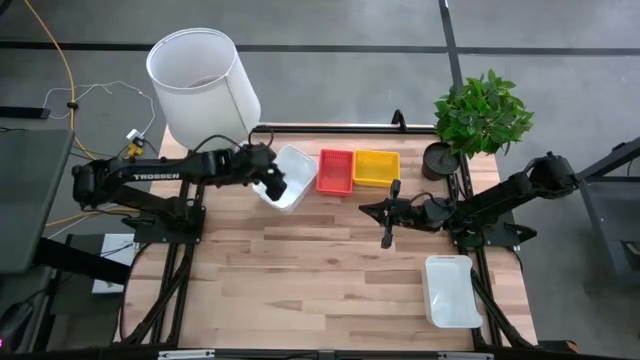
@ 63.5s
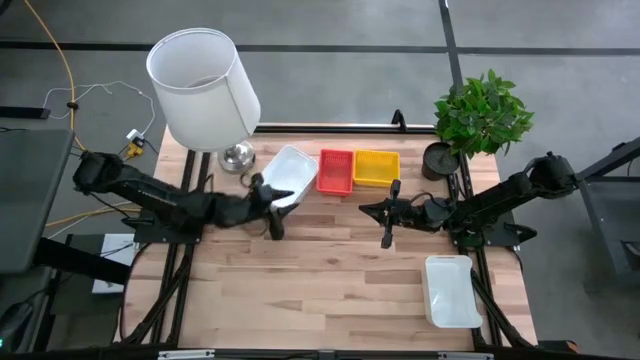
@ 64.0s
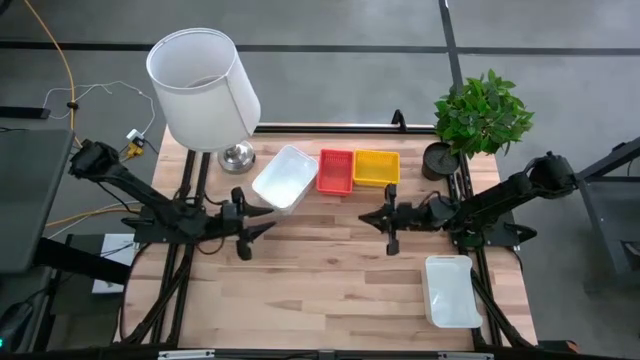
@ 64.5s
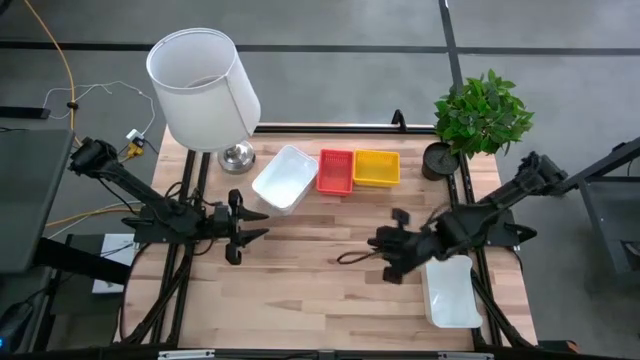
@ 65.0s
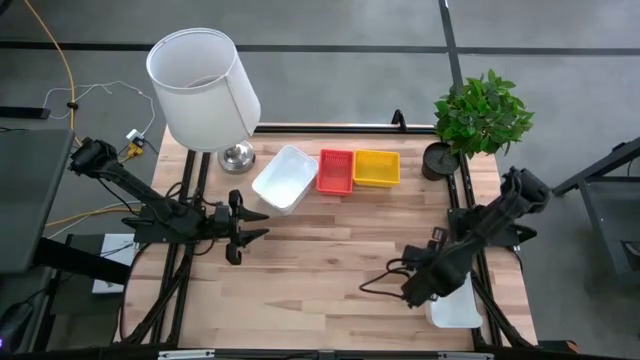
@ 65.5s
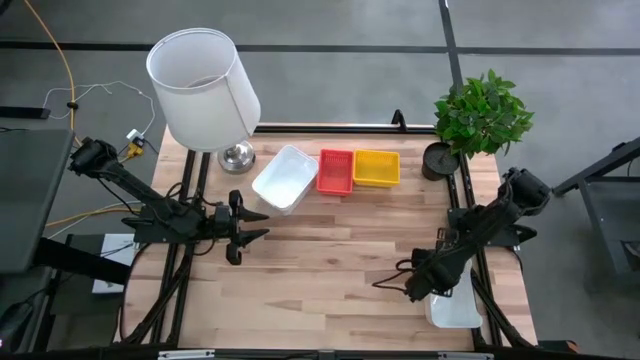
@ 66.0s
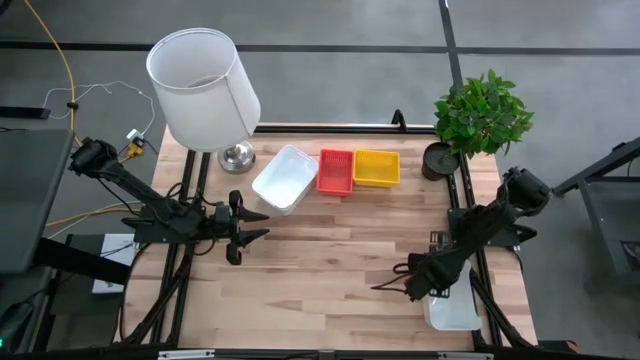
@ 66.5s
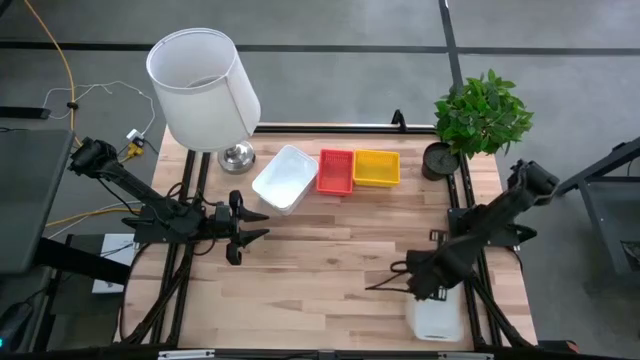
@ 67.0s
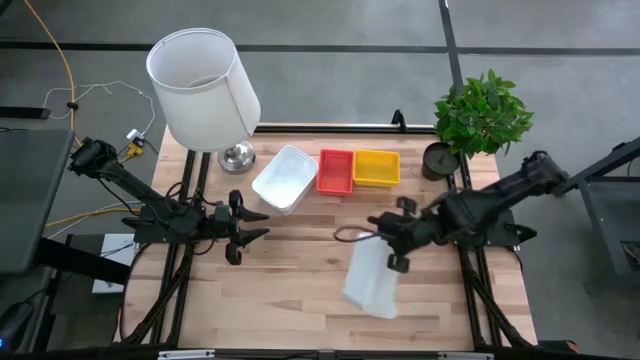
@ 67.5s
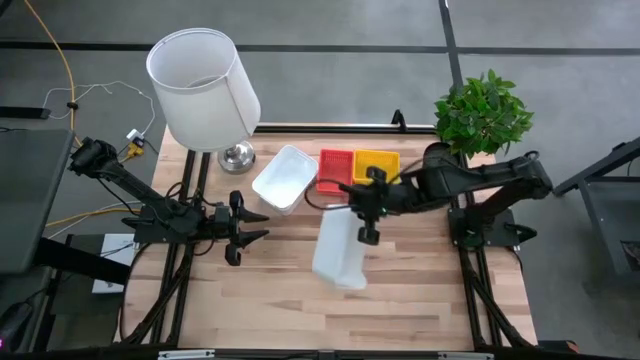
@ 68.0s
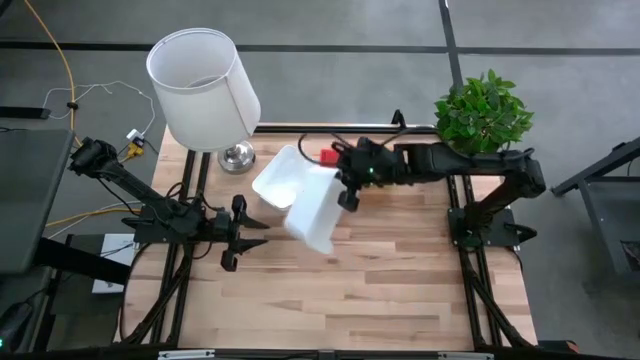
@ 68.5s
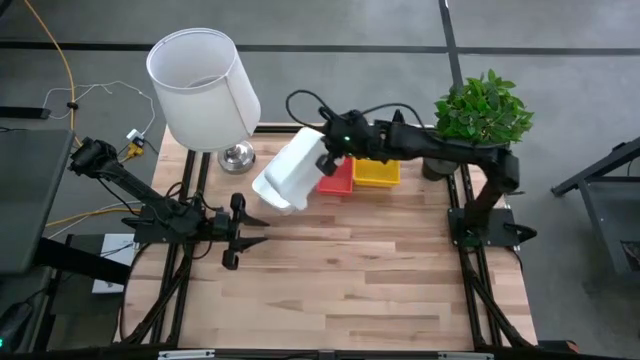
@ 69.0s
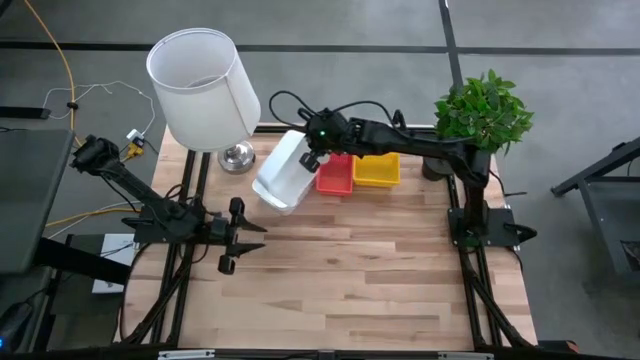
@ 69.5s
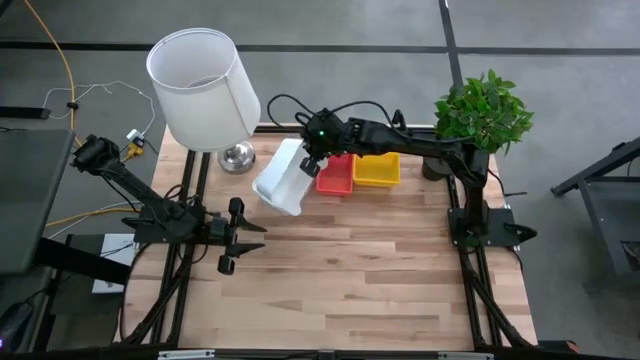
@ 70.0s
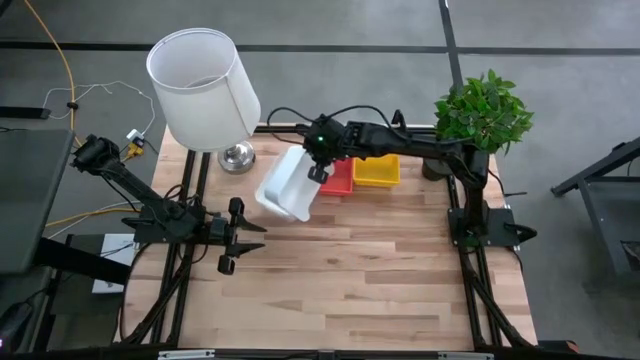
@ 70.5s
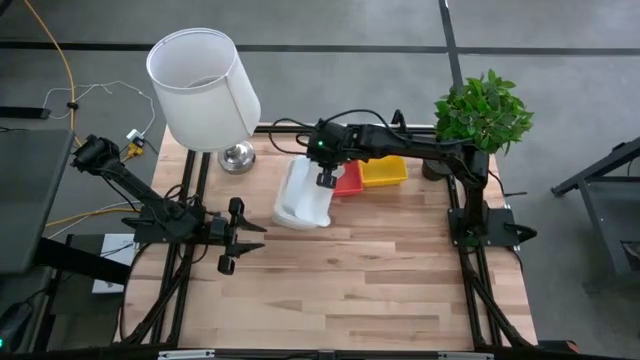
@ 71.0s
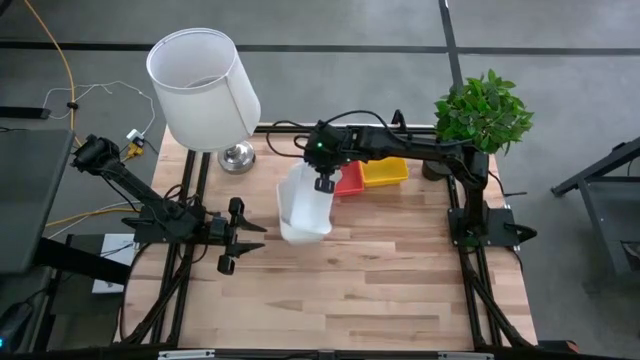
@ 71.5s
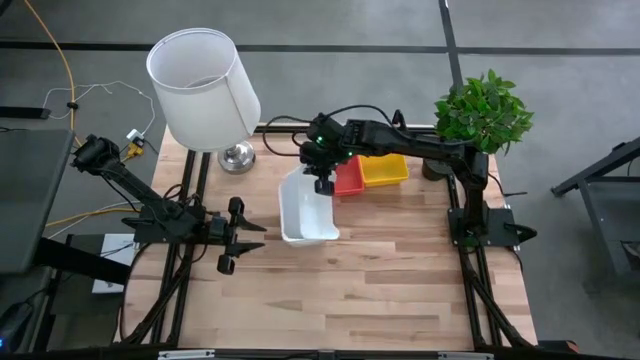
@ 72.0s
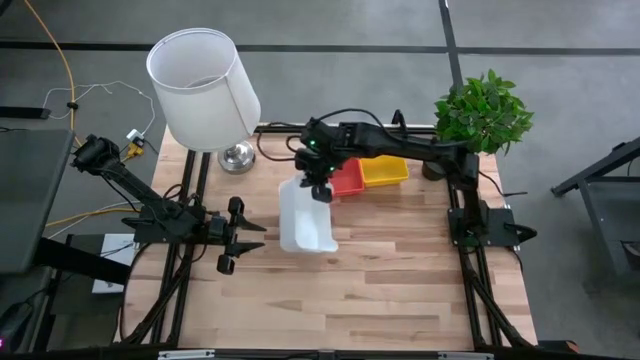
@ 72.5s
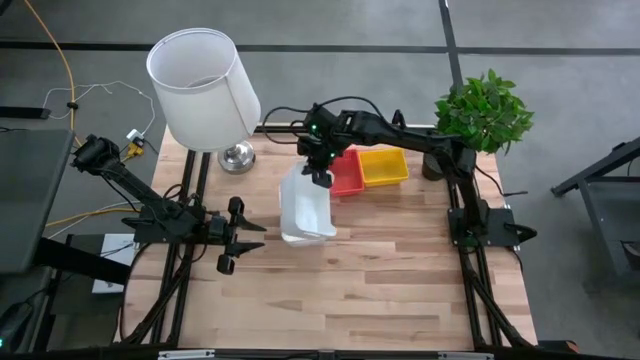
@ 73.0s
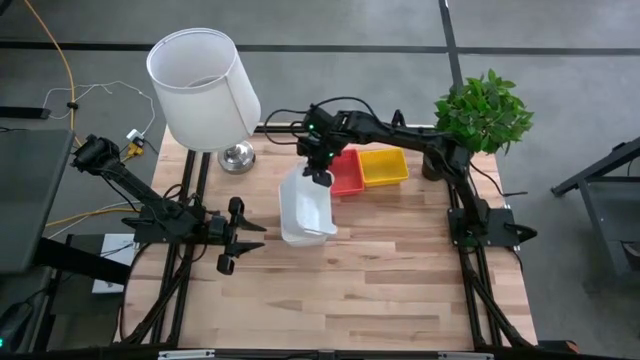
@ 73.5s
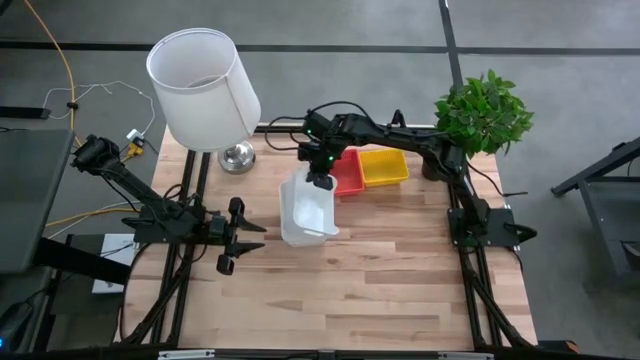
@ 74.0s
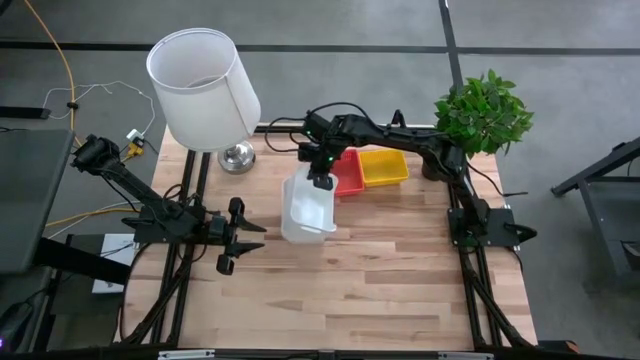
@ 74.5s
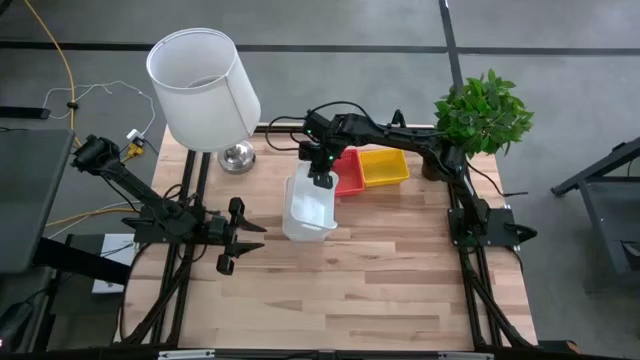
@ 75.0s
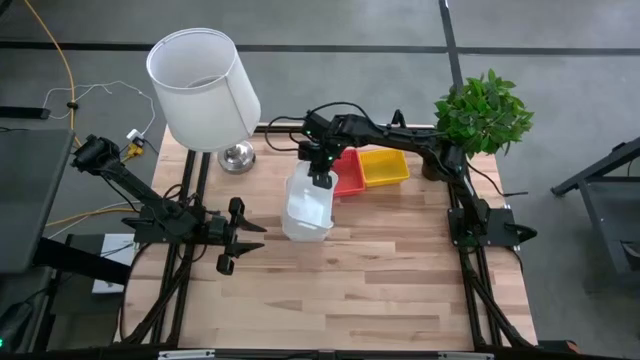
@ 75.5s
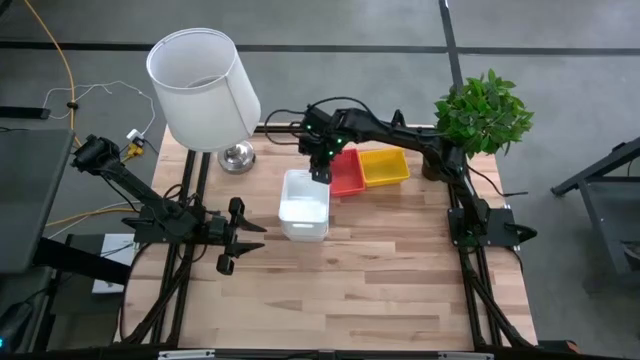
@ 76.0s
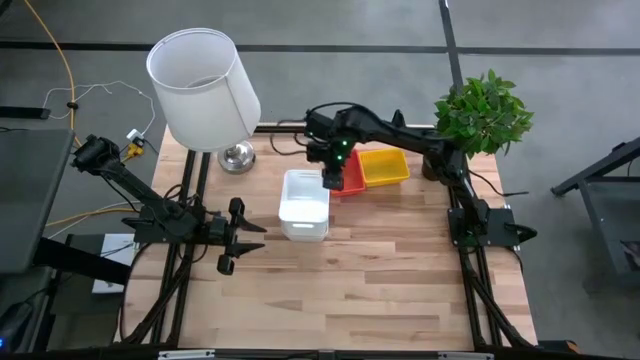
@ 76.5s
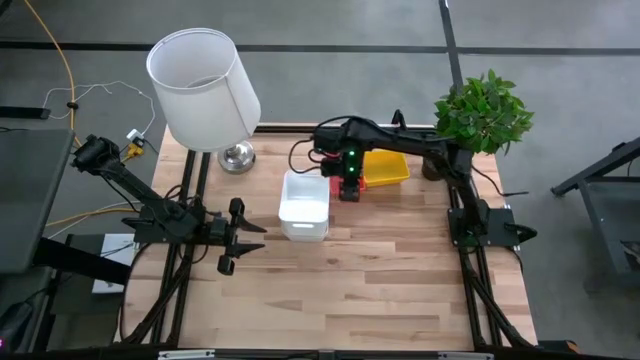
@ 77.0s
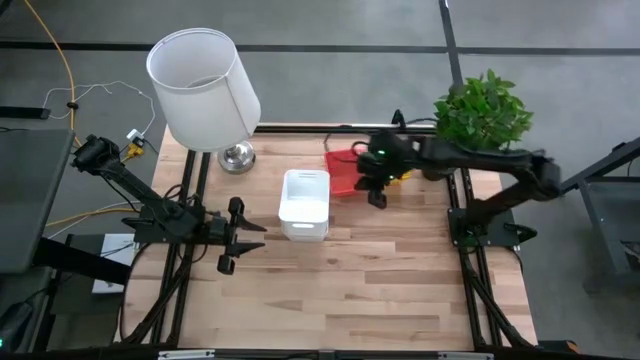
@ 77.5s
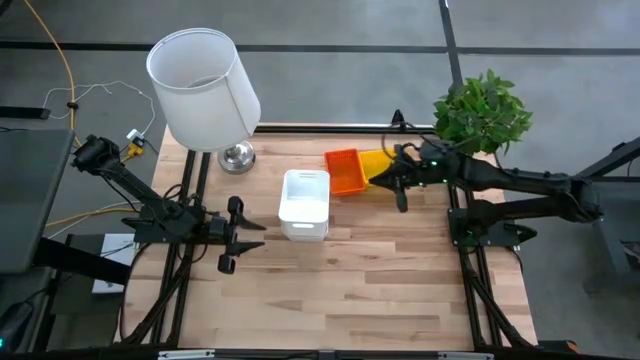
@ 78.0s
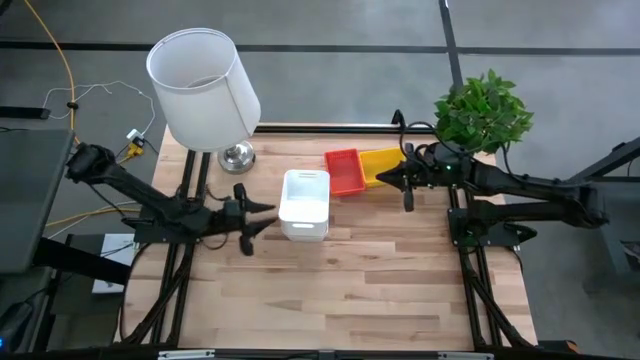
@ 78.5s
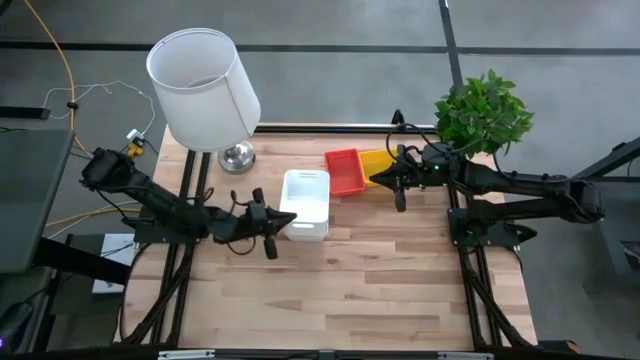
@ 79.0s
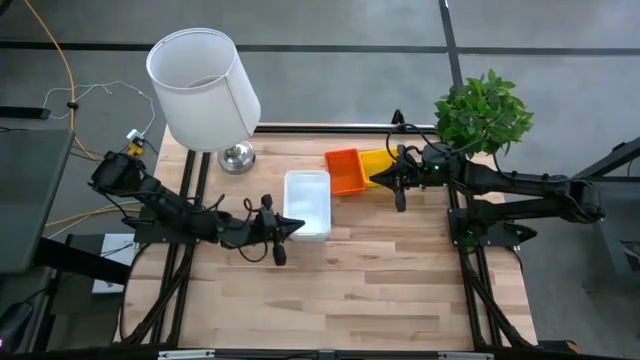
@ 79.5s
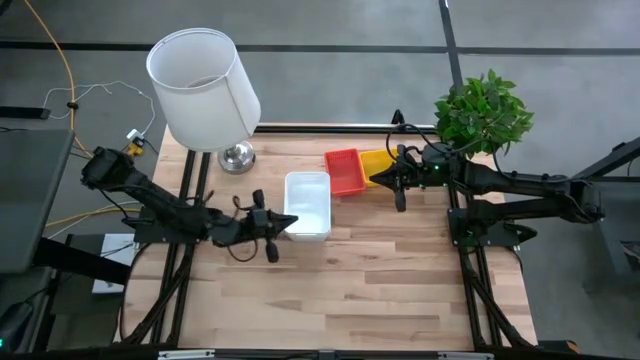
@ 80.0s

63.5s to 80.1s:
Stack the bottom white bin on the white bin

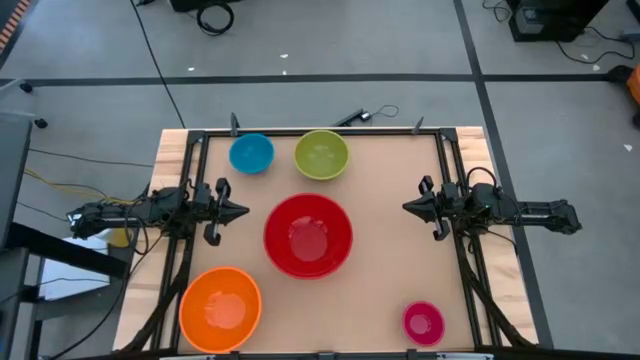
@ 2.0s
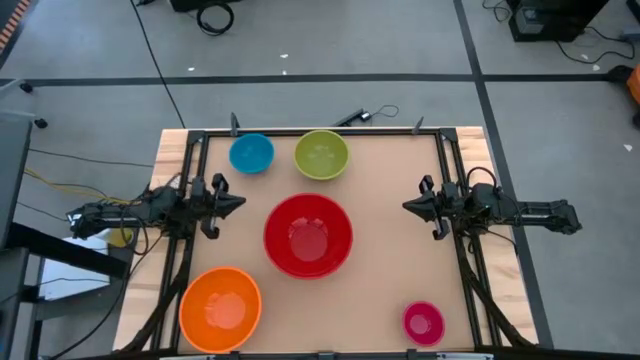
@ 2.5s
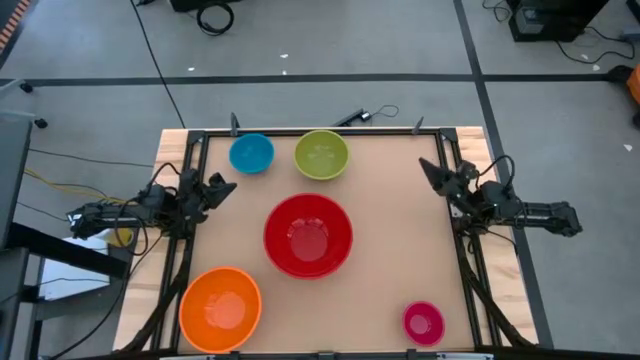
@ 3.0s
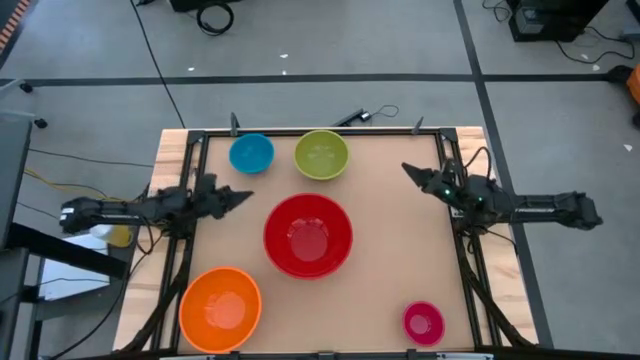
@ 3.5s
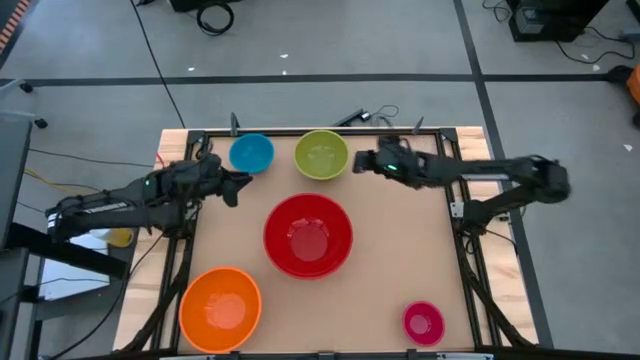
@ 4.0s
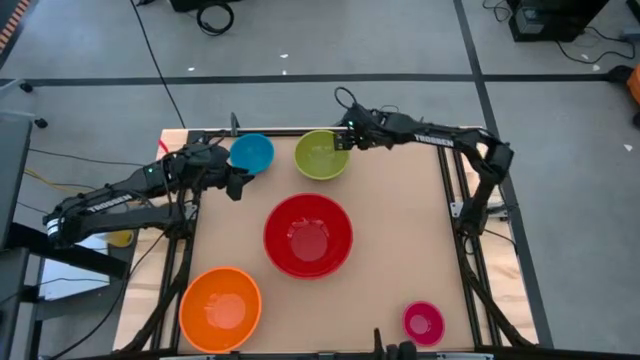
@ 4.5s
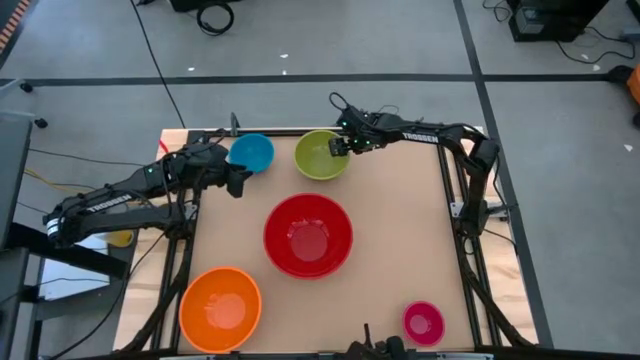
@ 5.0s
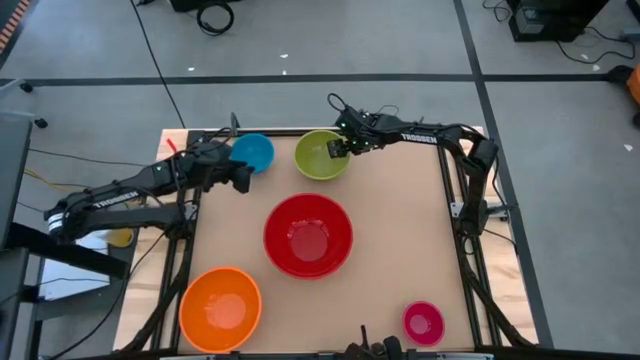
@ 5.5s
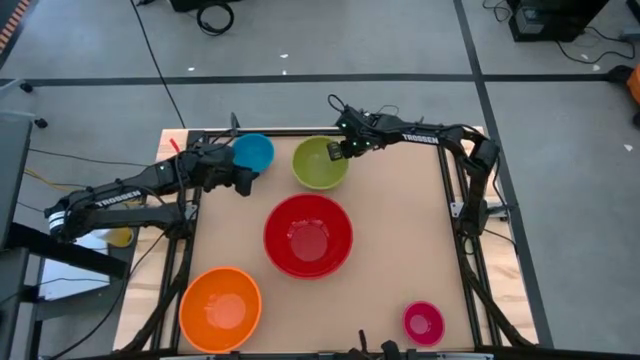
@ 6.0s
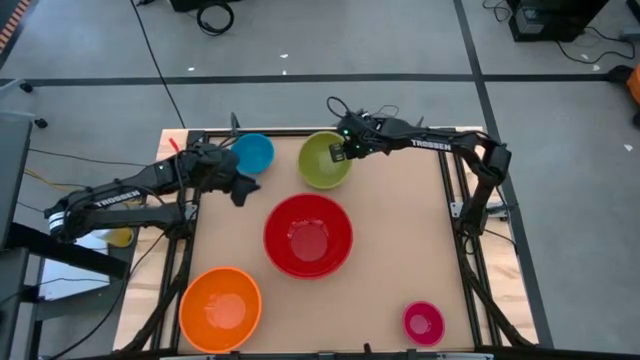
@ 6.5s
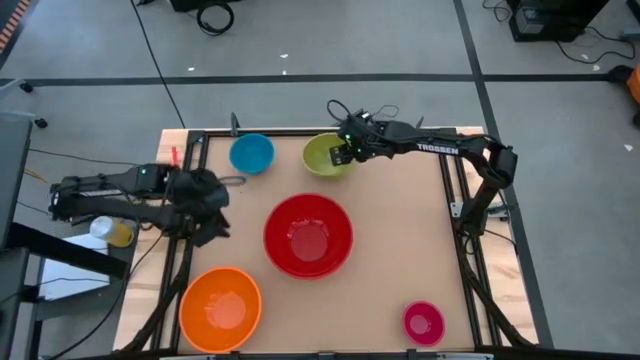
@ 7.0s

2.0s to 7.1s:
Stack the orange bowl into the red bowl
